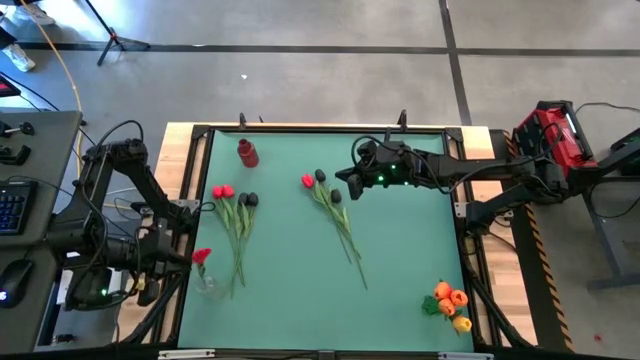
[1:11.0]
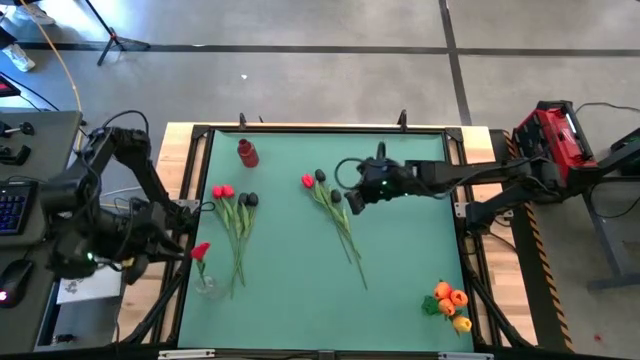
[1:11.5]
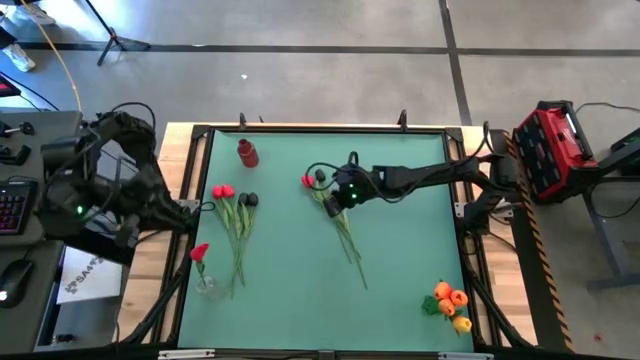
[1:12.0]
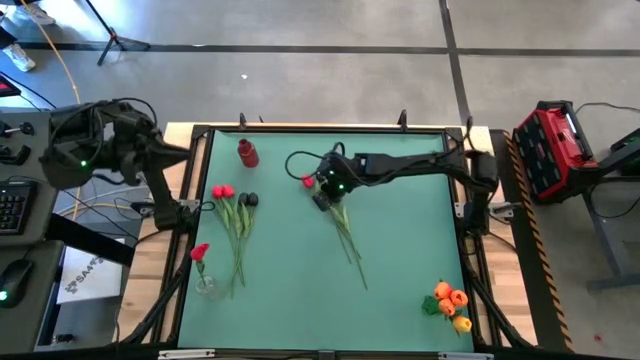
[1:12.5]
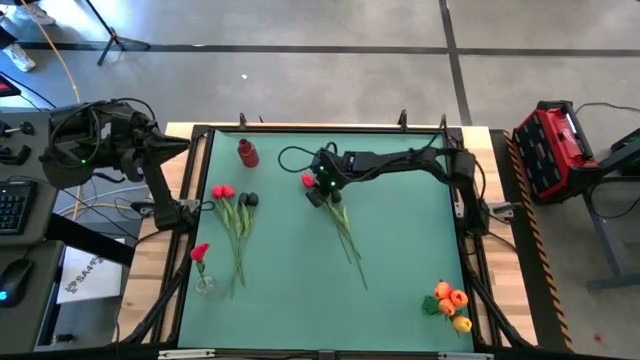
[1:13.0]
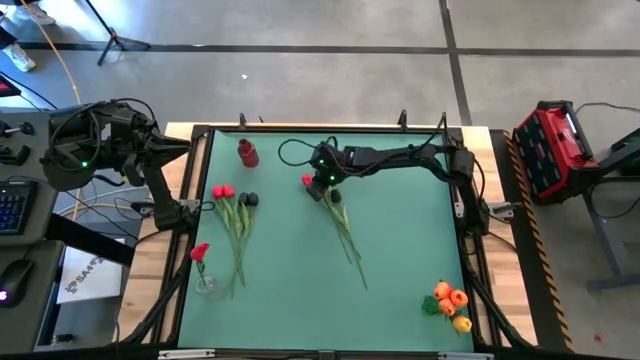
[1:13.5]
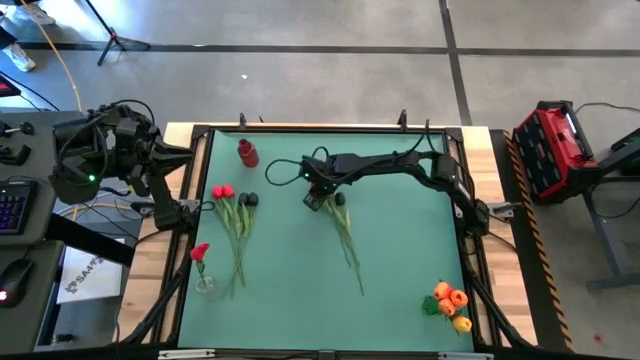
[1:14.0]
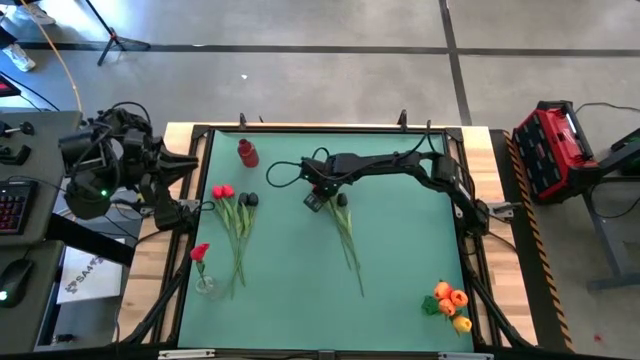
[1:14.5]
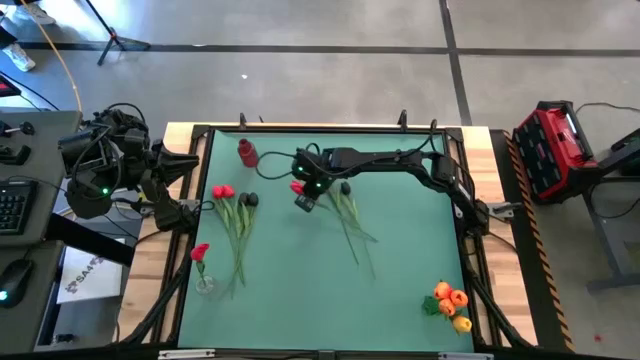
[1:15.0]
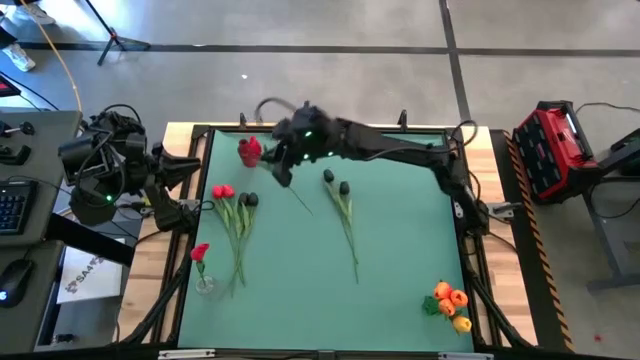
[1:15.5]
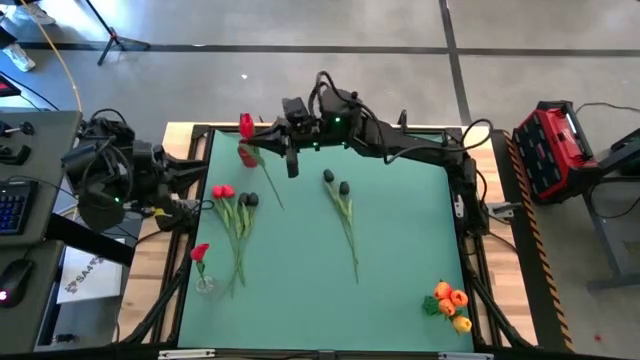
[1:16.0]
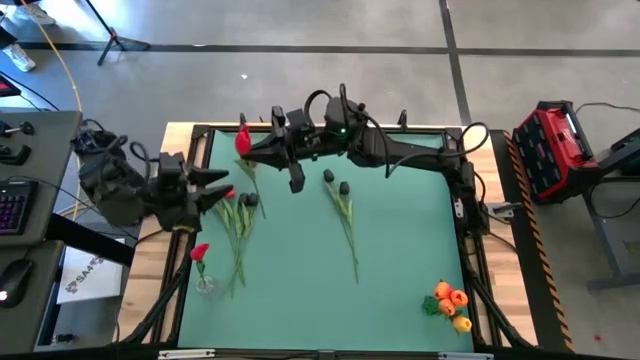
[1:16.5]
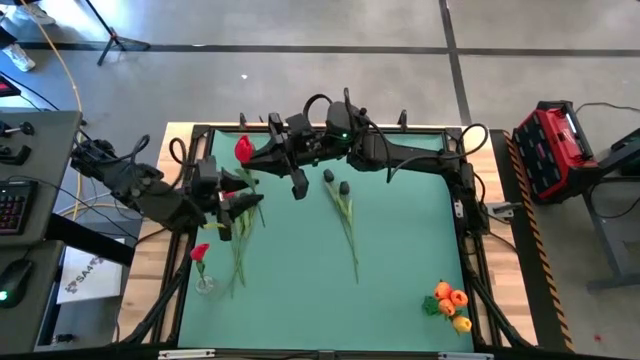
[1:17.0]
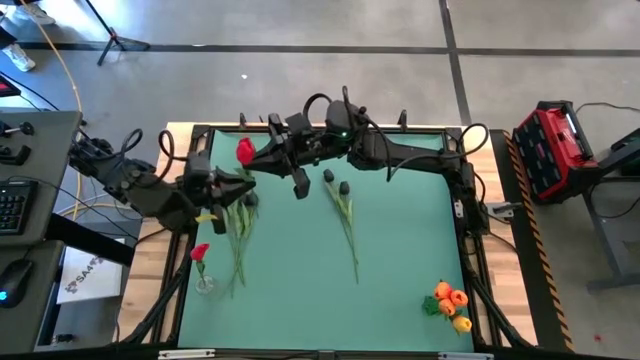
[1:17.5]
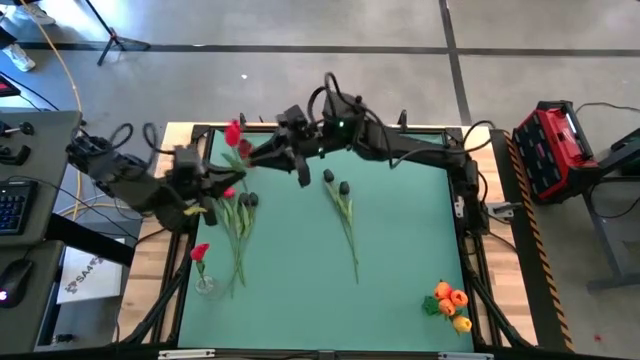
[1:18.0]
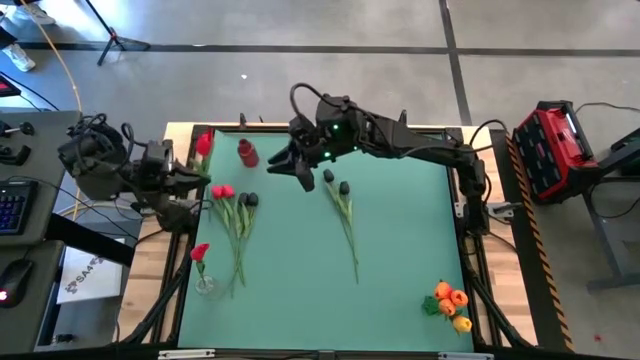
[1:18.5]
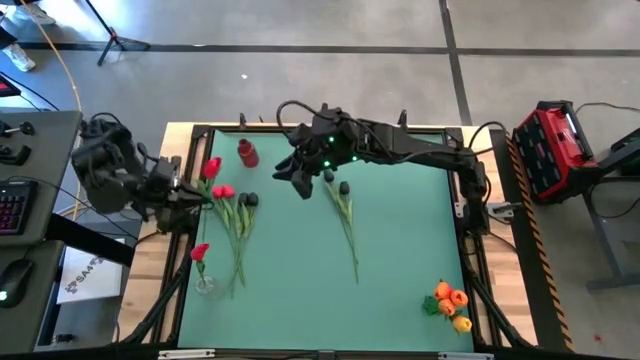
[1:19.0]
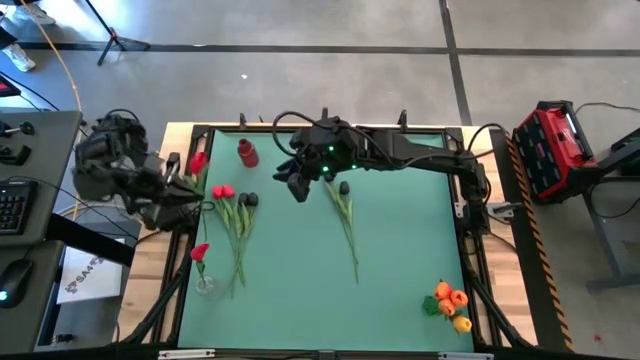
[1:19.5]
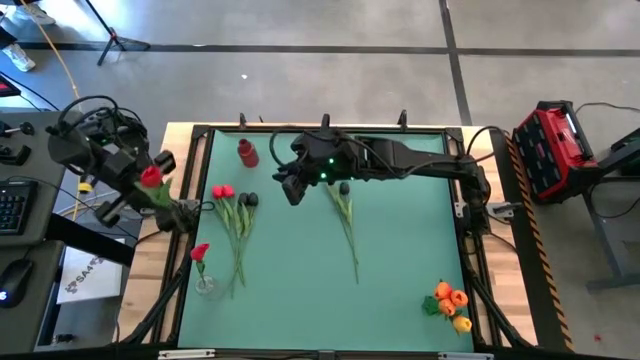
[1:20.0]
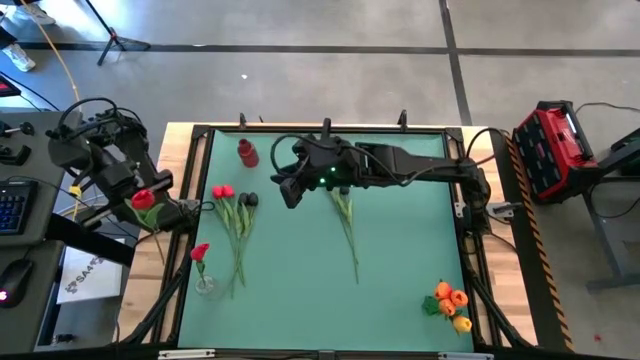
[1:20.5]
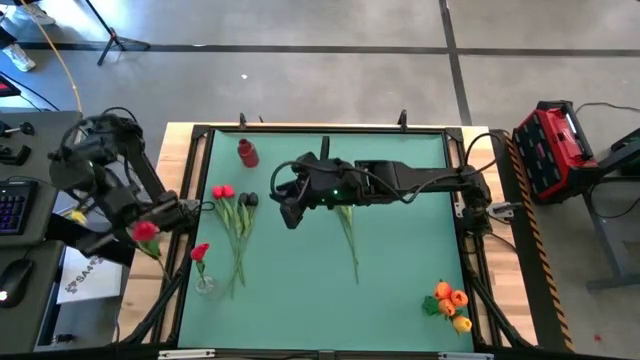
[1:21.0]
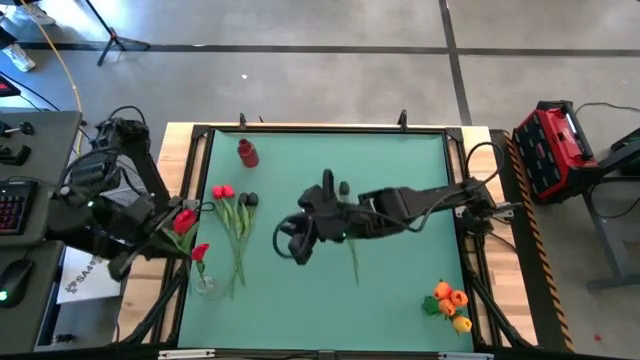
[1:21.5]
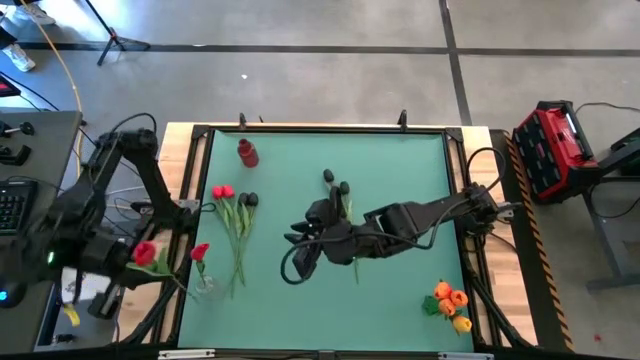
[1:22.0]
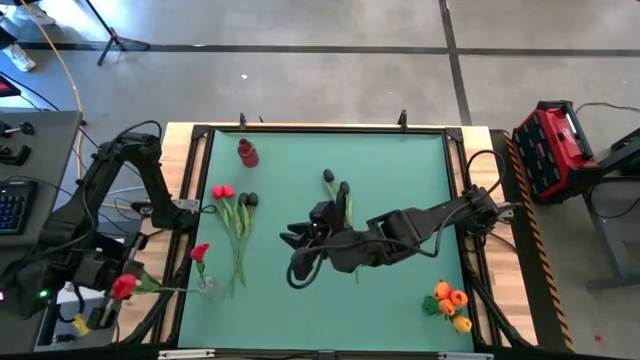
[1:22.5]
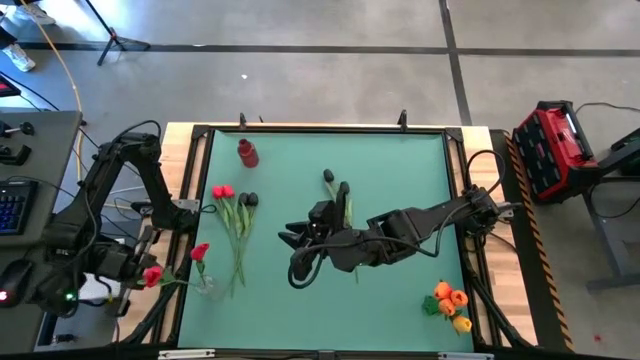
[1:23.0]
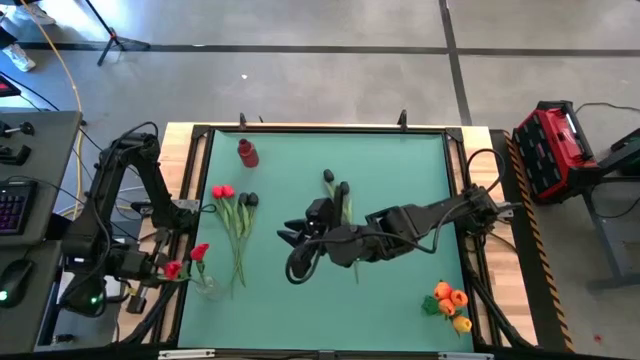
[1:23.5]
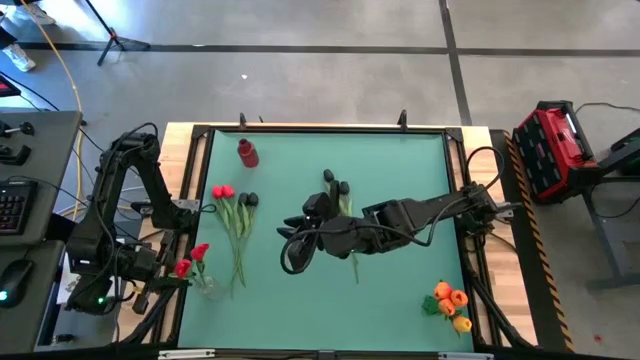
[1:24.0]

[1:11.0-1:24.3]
Task: Sort flowers into vase by color
Put the red flower into the transparent vase
